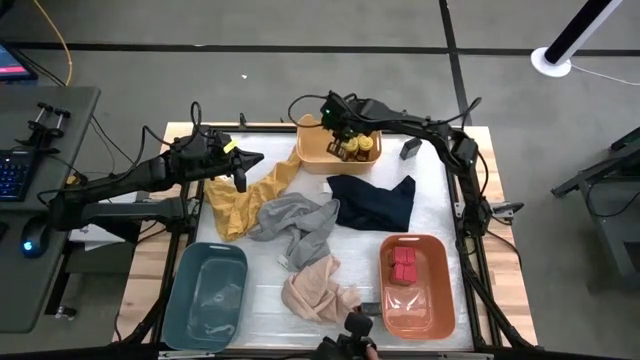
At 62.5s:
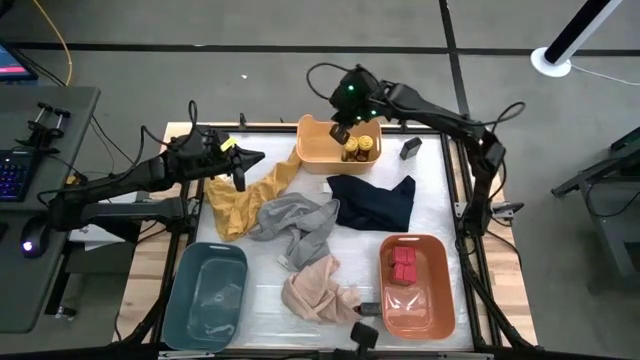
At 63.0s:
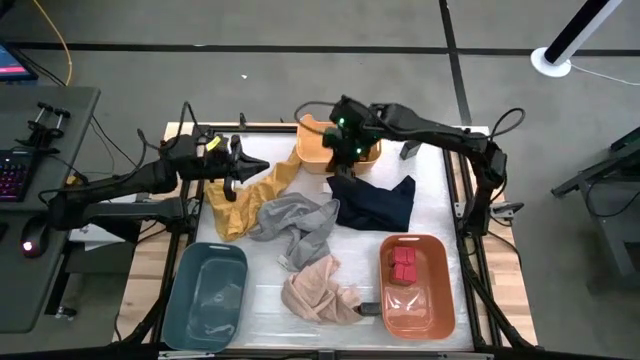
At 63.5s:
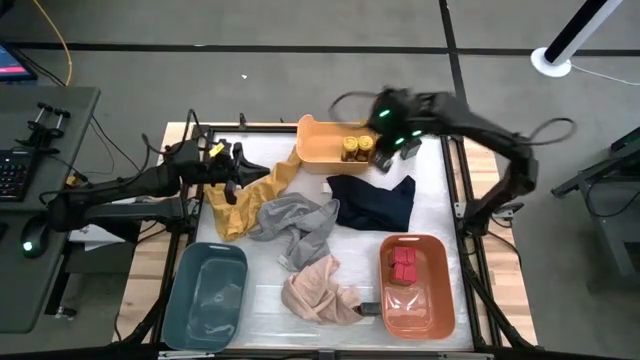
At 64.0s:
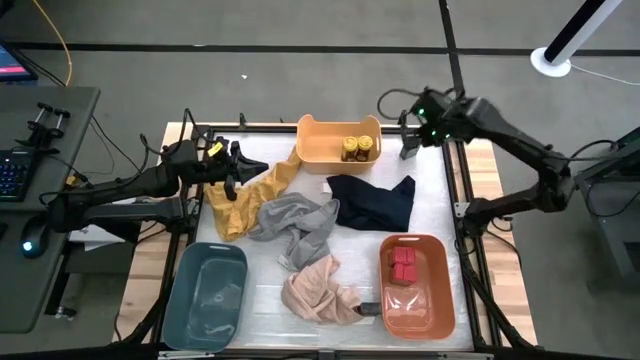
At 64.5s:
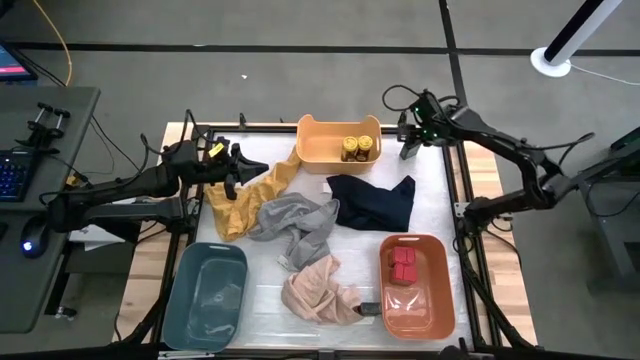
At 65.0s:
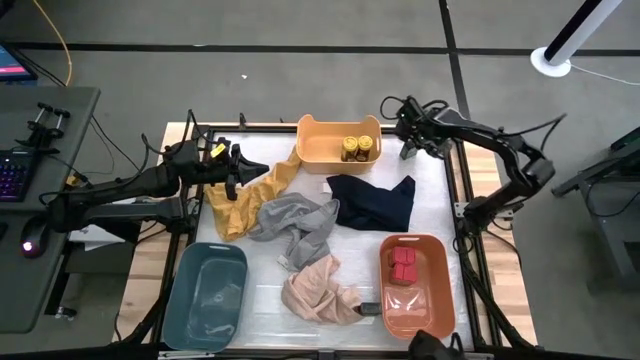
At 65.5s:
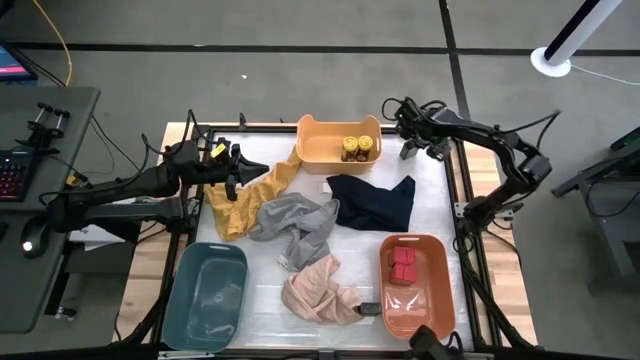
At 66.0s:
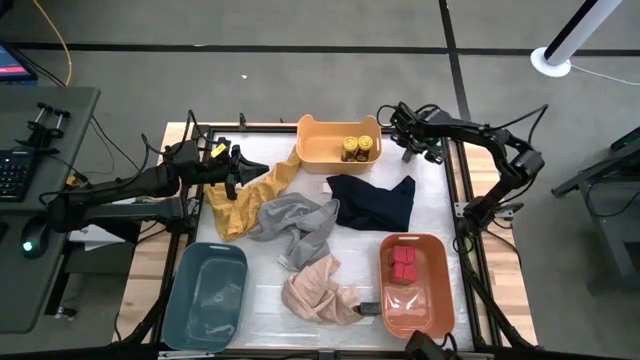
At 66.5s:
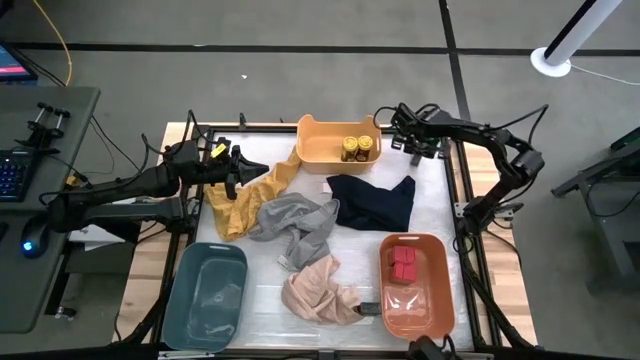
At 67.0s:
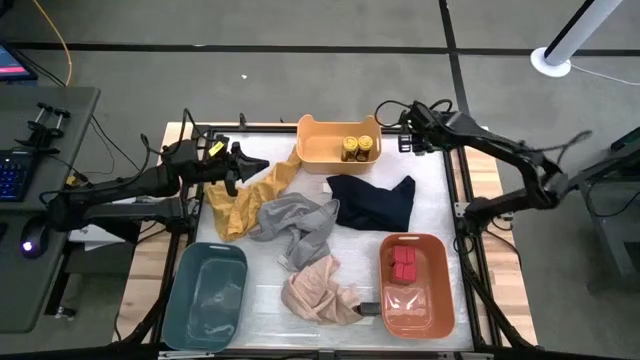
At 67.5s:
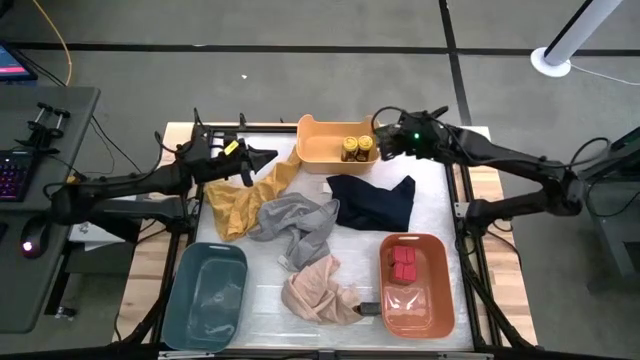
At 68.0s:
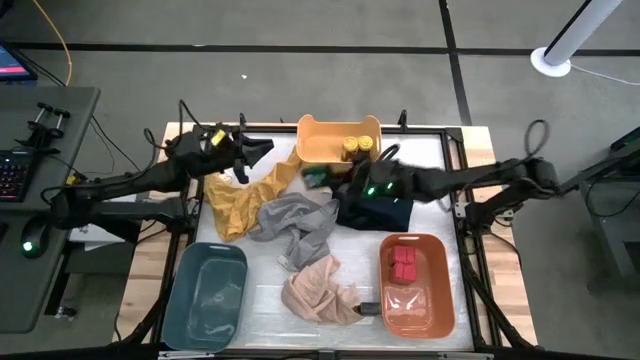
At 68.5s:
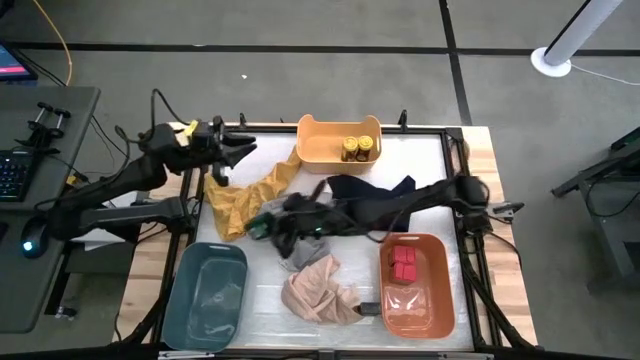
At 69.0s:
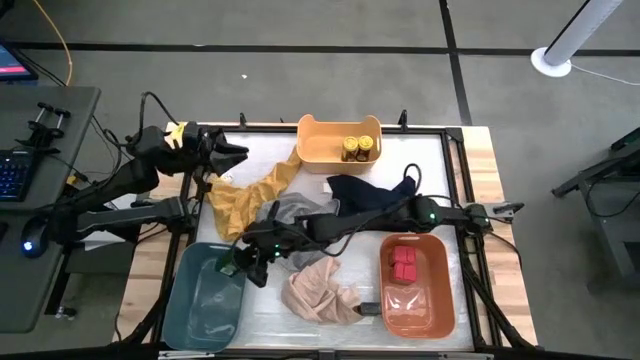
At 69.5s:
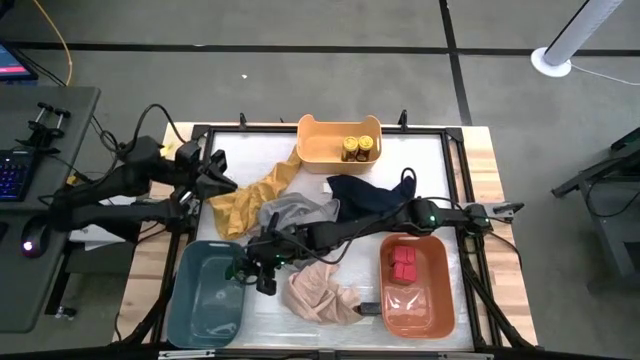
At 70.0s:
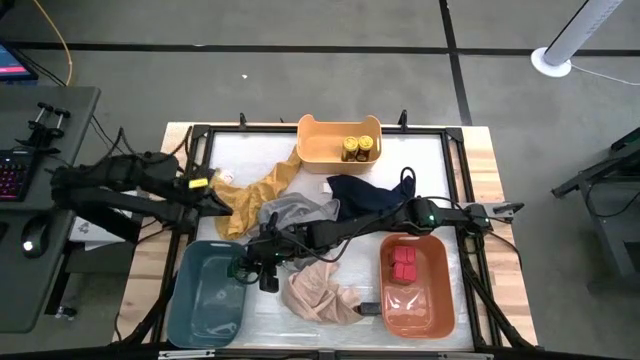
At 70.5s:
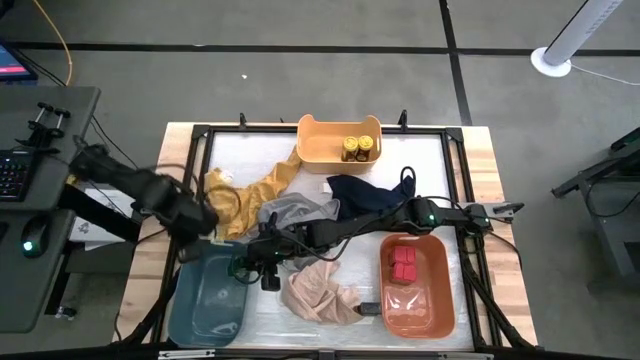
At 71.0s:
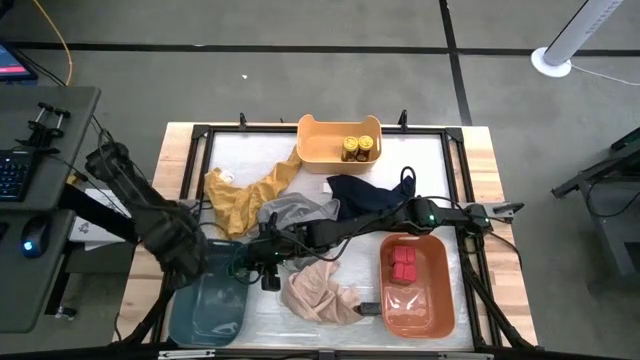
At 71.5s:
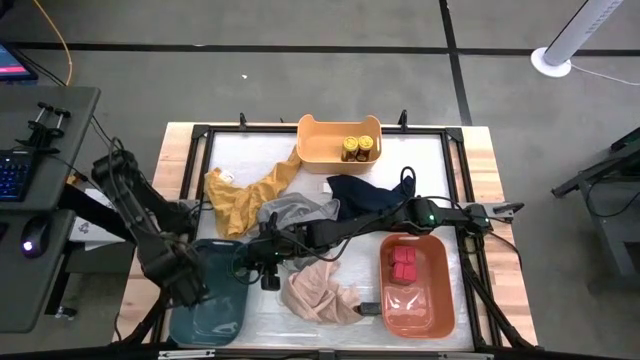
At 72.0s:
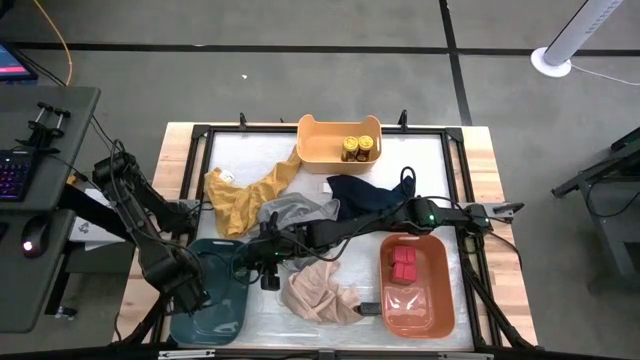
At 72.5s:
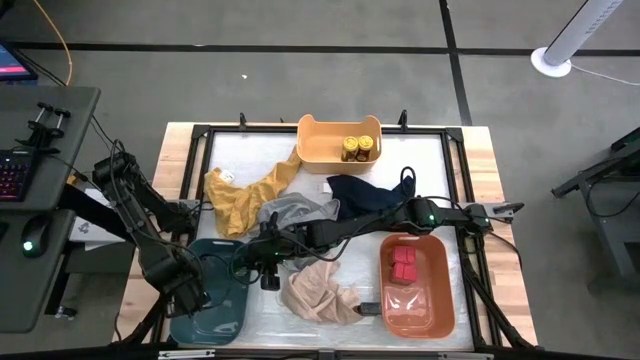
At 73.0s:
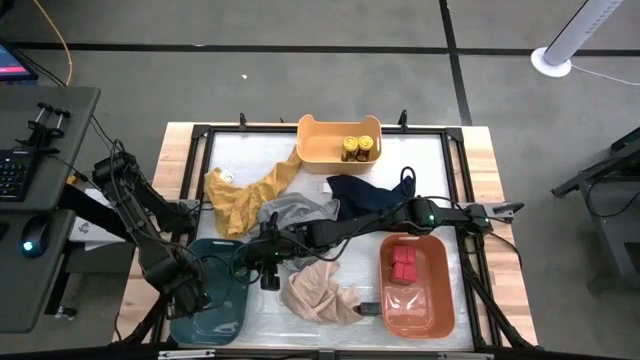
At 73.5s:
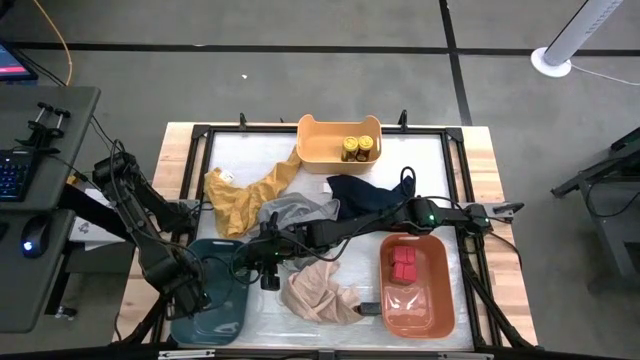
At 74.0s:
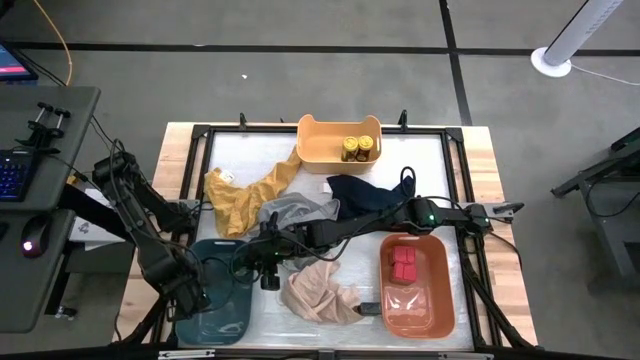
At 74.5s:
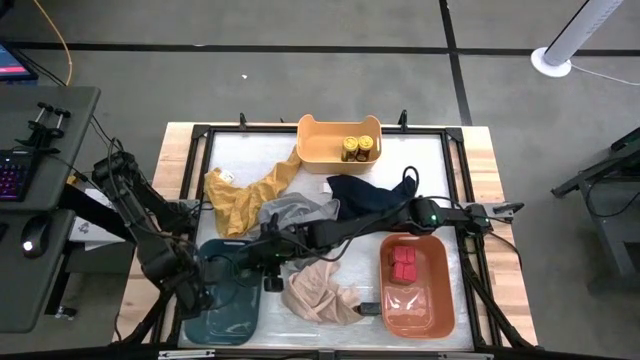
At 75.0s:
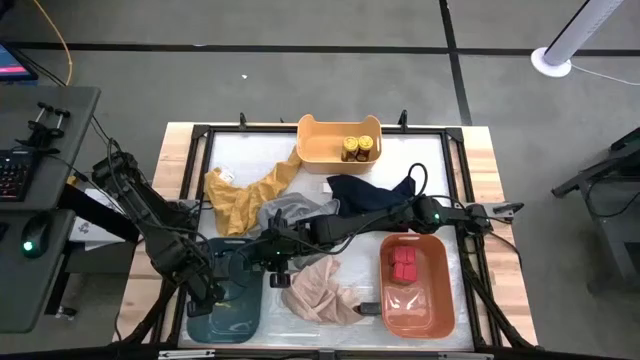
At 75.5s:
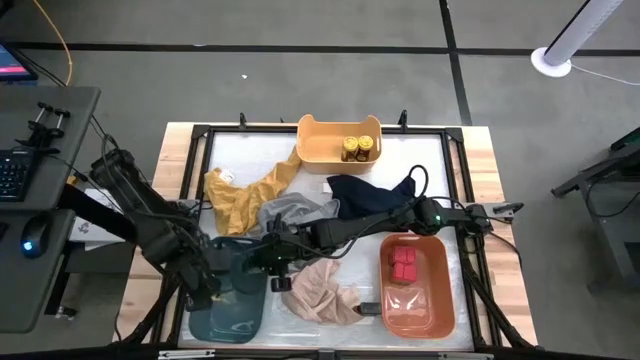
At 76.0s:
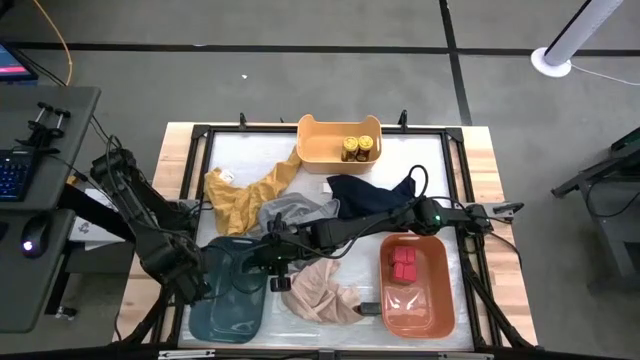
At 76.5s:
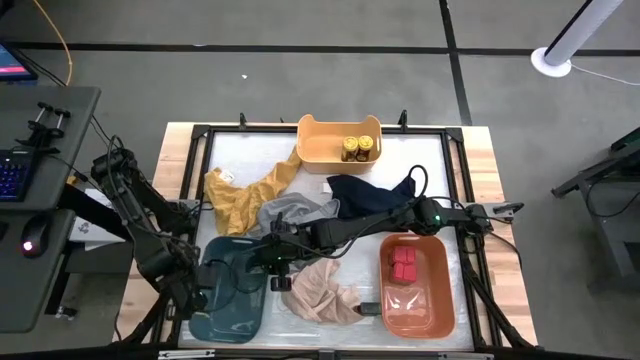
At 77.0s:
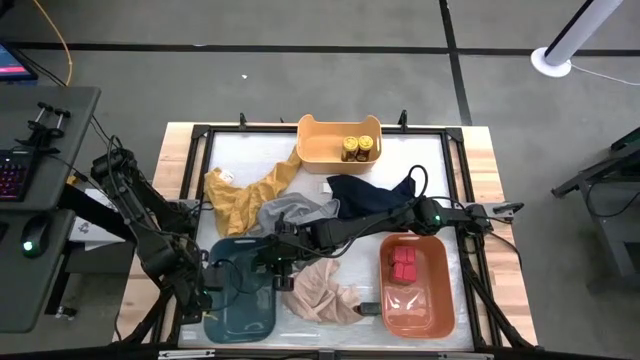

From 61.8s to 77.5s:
Task: Sort spices by type
Put the top green seasoning can into the blue bin

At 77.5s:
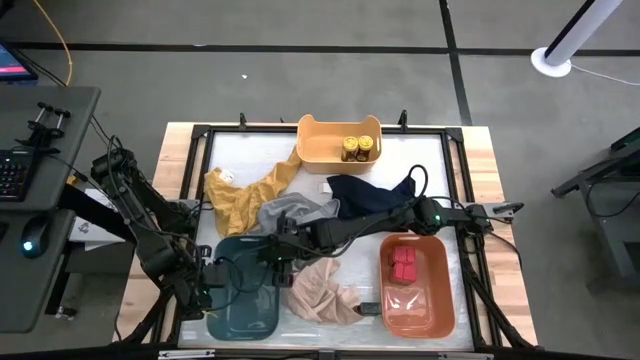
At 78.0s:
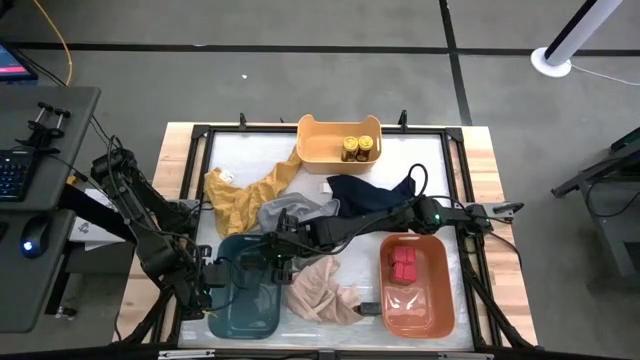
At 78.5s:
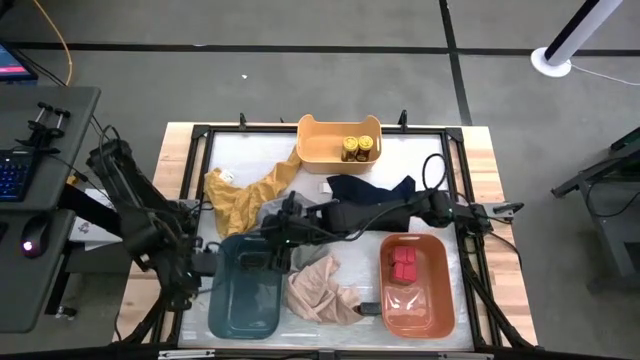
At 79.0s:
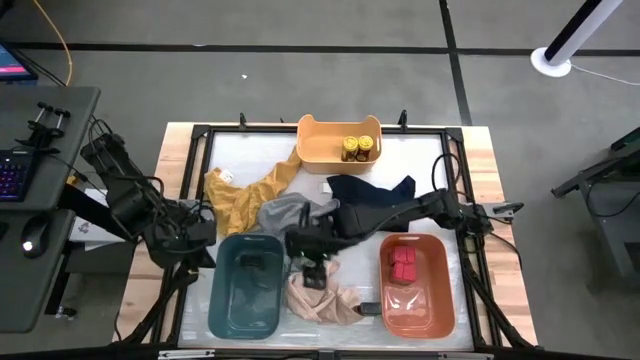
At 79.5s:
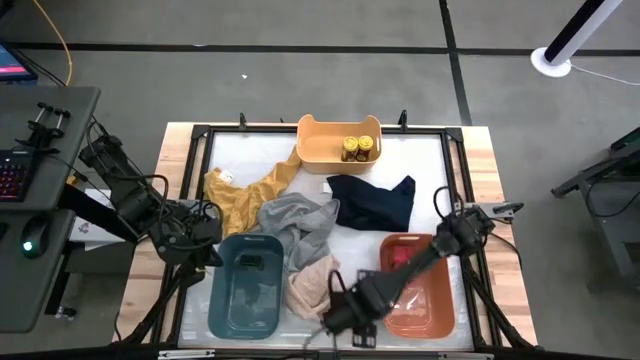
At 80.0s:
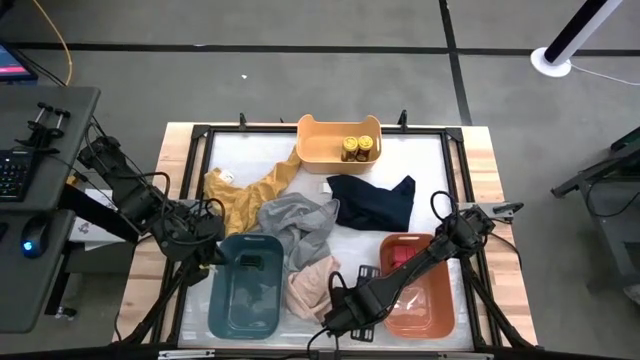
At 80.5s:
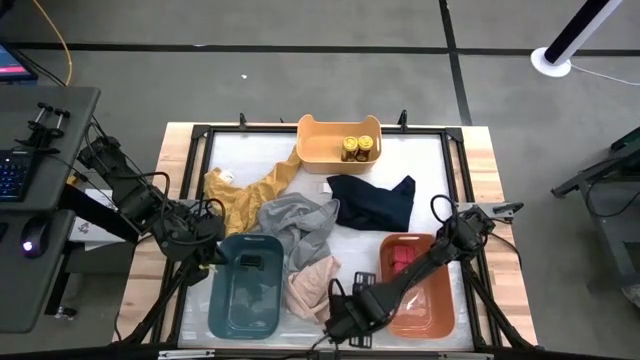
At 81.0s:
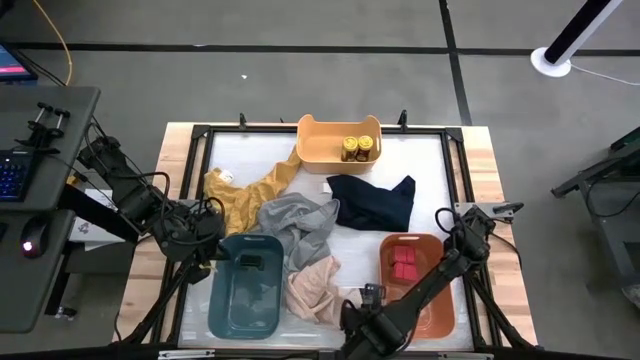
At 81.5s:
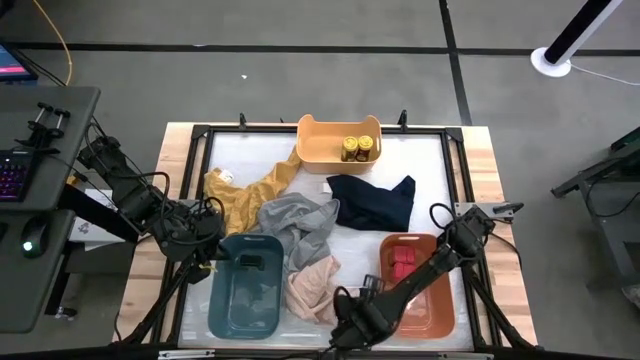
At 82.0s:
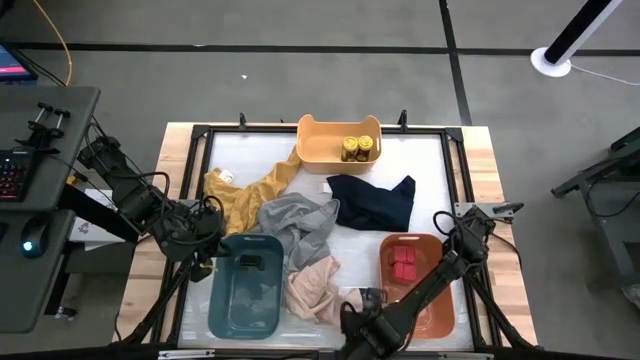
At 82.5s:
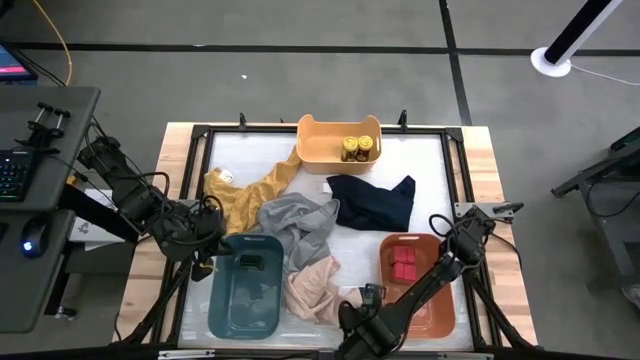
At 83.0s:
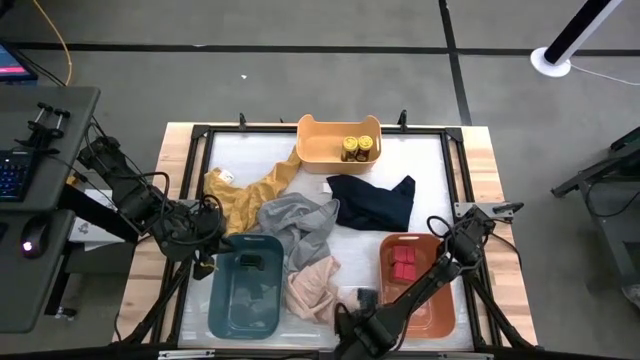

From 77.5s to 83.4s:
Put the green seasoning can into the blue bin
